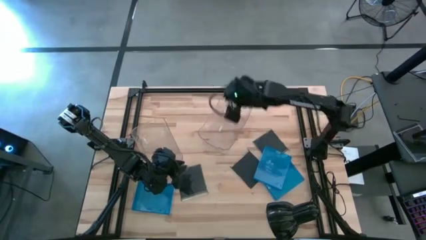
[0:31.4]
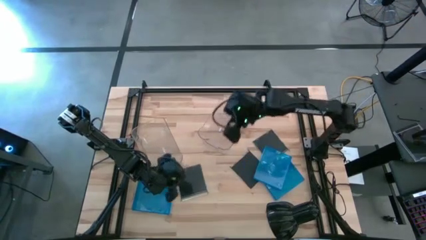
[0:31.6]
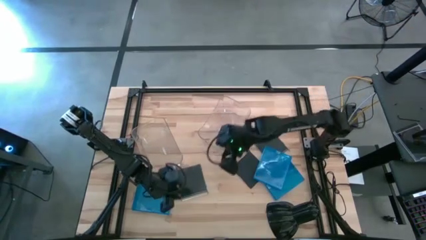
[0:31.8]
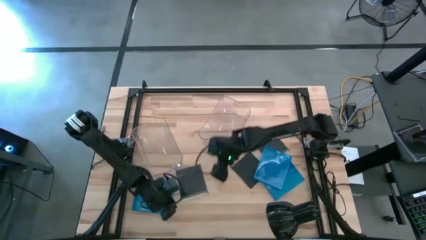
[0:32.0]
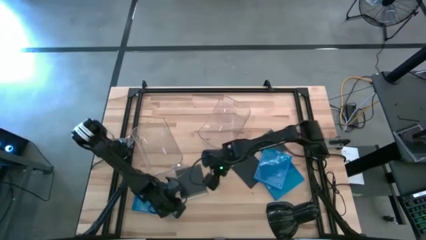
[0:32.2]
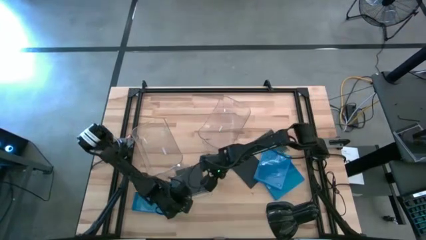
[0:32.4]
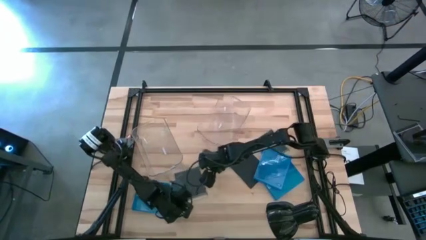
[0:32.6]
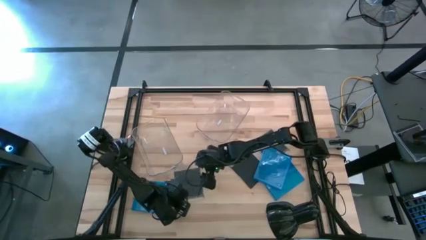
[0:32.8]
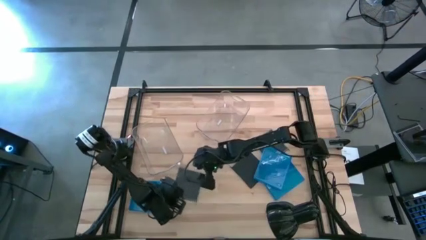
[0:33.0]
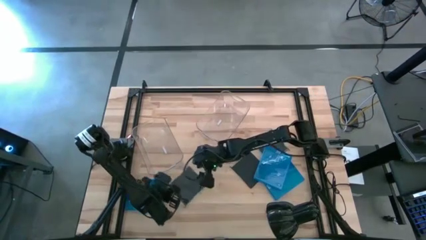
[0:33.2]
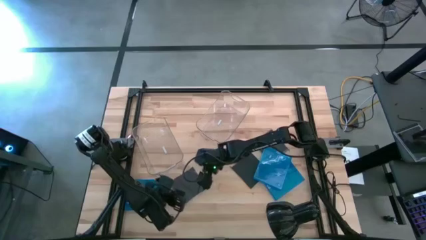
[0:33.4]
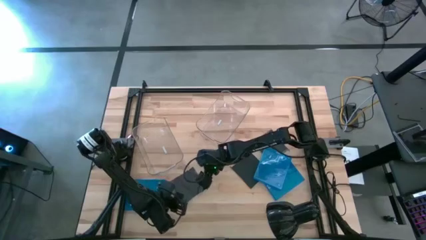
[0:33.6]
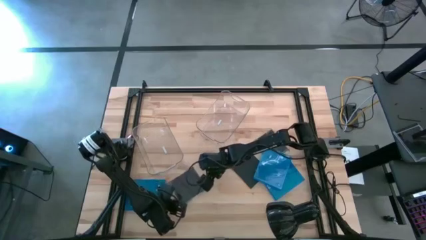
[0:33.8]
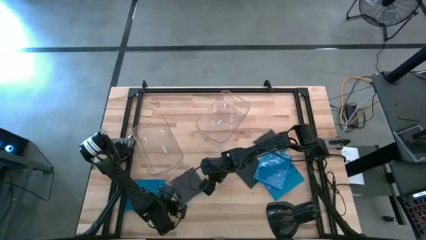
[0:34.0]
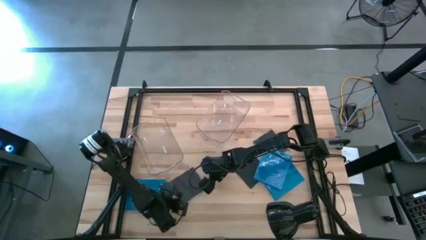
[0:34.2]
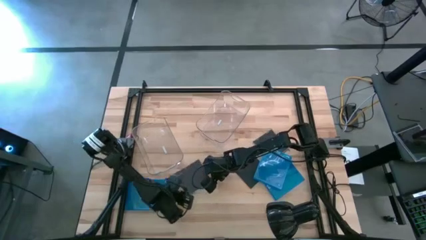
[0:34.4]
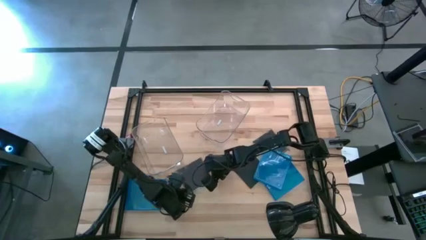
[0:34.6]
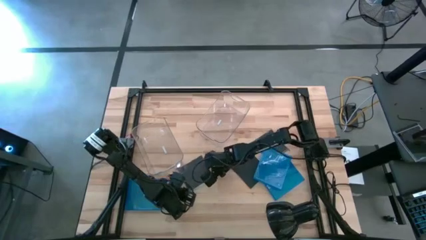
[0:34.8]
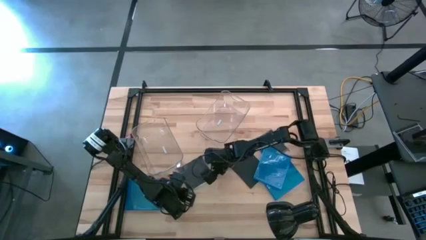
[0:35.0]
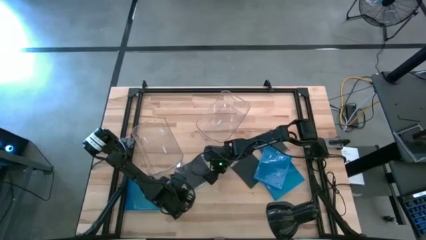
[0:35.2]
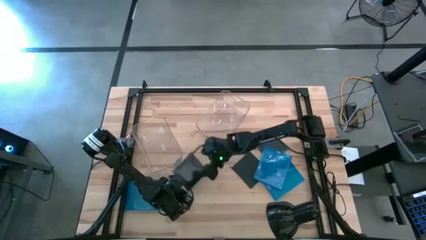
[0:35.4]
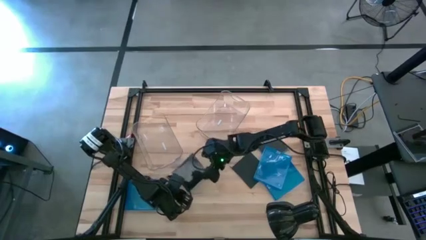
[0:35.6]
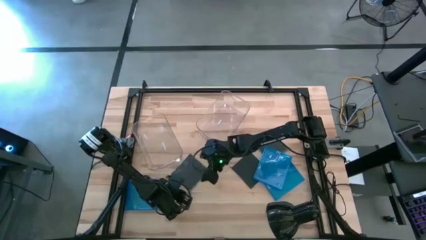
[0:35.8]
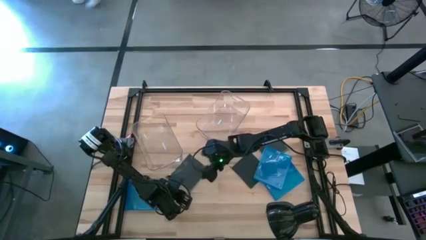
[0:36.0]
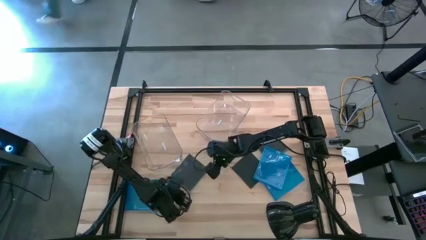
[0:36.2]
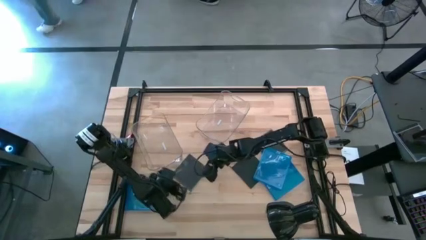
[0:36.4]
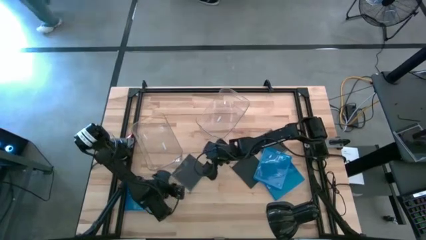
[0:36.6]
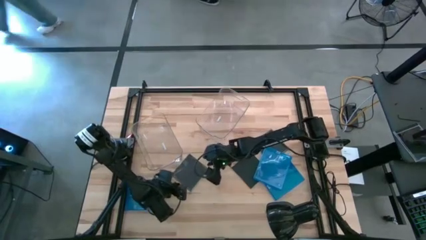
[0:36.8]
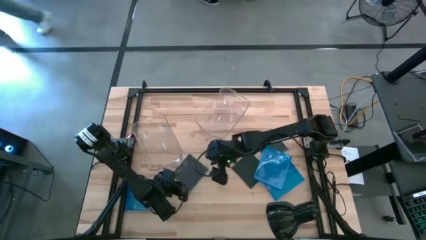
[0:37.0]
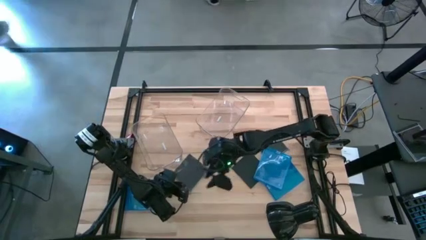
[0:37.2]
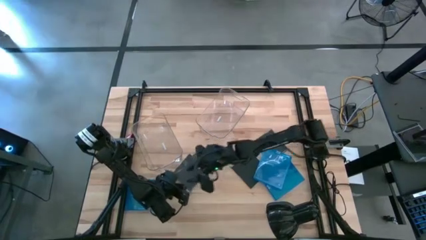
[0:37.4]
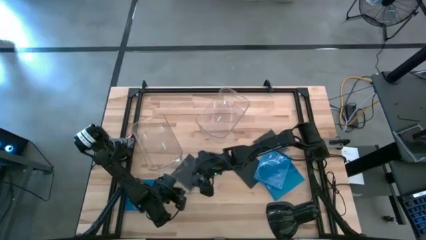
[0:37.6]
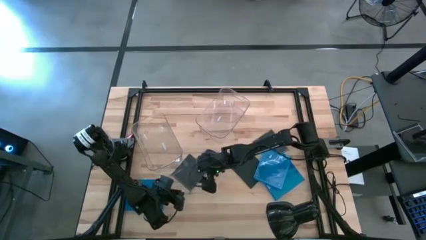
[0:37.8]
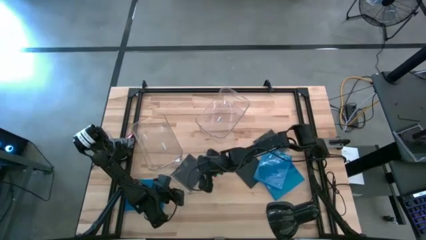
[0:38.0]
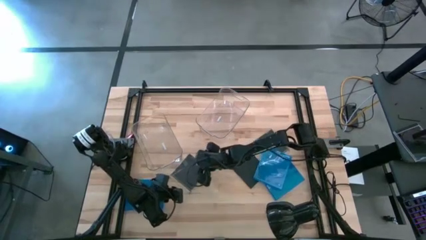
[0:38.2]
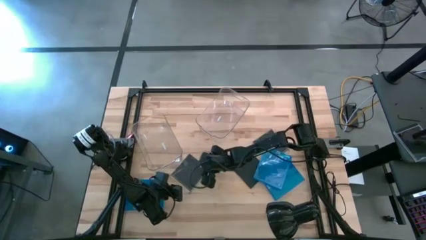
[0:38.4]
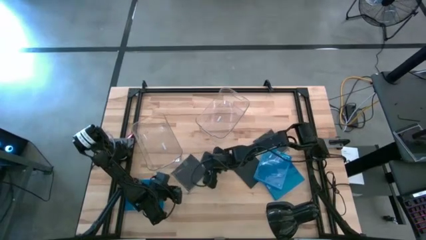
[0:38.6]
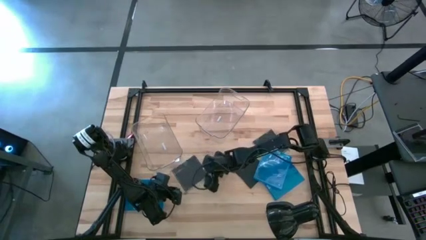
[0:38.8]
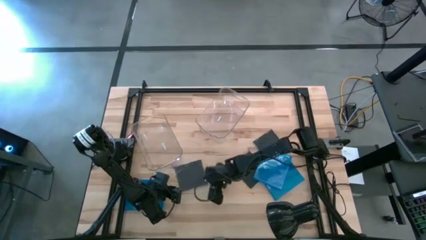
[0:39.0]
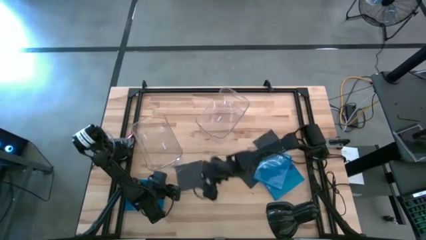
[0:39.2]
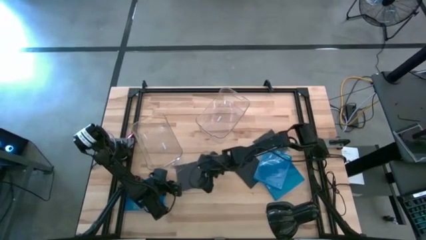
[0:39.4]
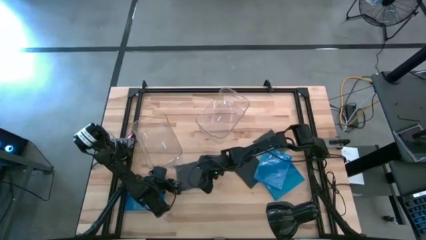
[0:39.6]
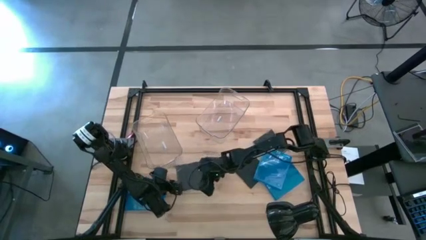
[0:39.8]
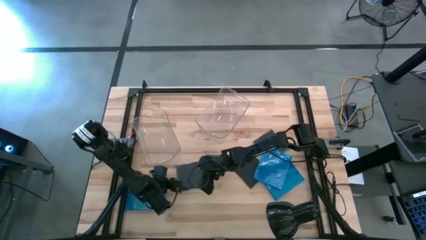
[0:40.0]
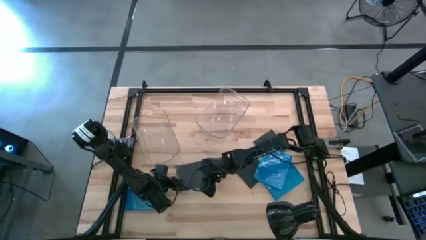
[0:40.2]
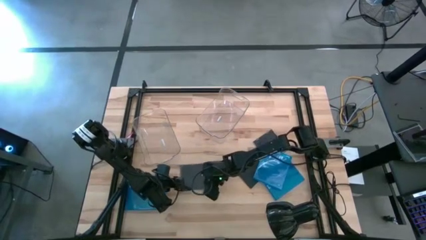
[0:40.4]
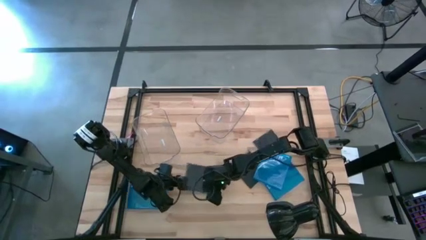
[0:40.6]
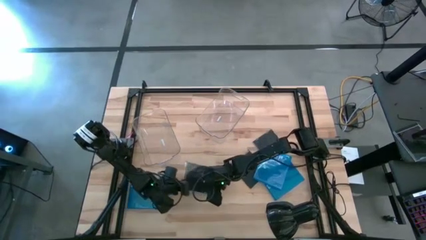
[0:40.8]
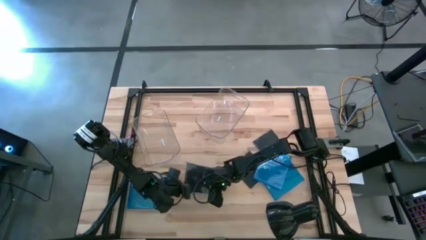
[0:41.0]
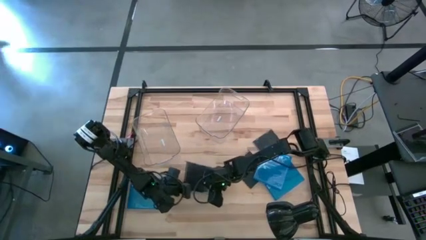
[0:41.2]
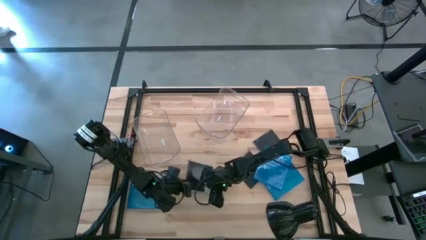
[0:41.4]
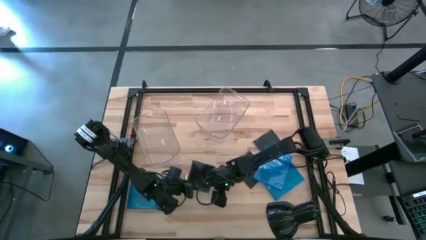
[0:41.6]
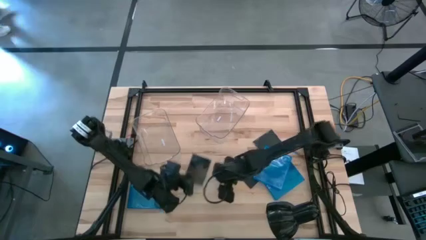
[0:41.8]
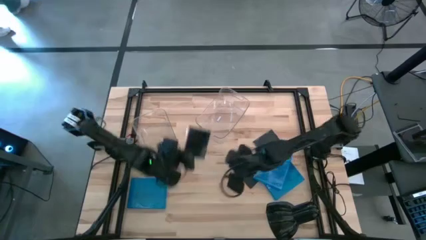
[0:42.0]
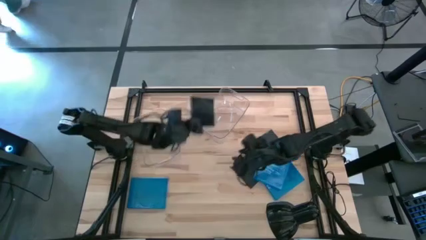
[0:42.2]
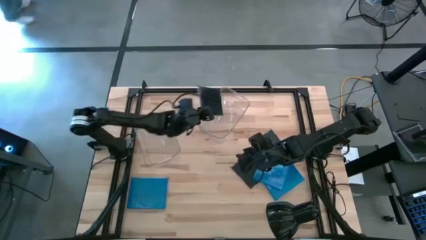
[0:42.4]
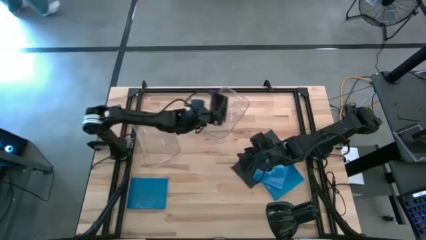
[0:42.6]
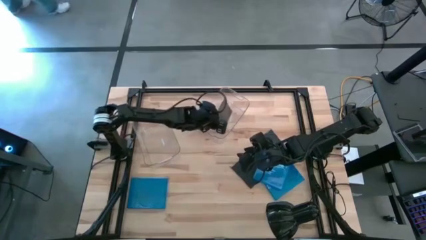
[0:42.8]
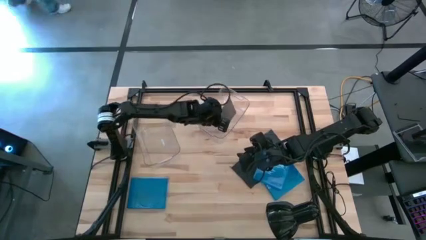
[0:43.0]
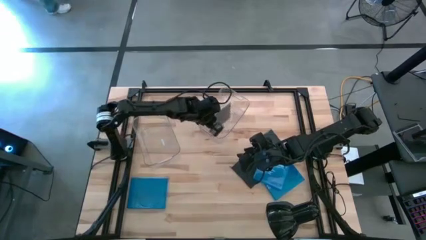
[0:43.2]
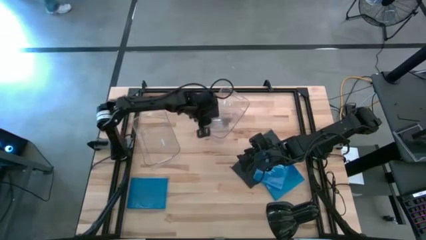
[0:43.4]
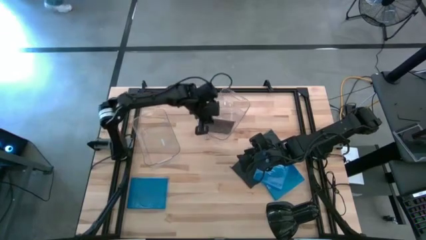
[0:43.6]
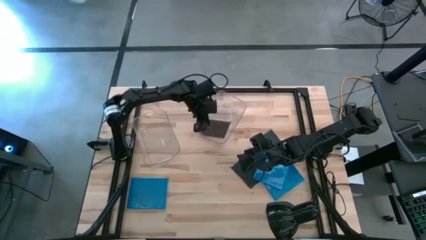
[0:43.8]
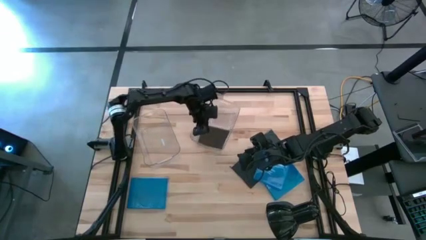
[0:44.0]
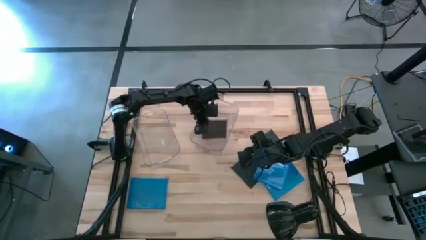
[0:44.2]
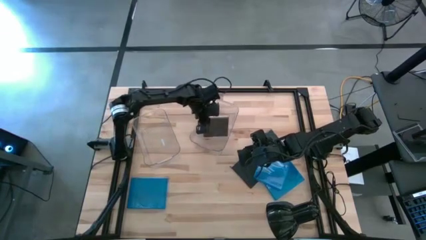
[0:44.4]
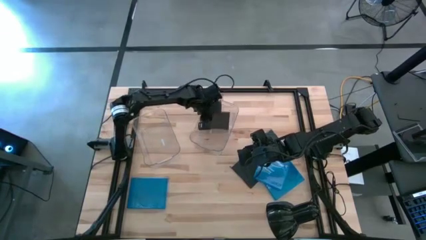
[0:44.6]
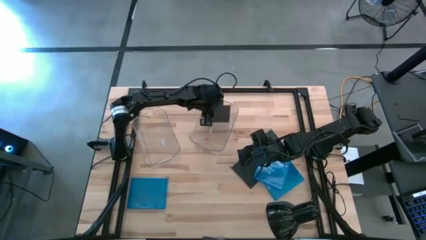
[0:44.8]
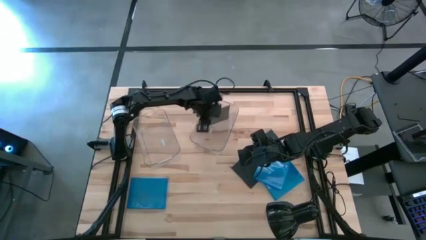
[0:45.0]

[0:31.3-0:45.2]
Task: Pick & place jewel cases by type
Put the left black CD case into the right transparent bin

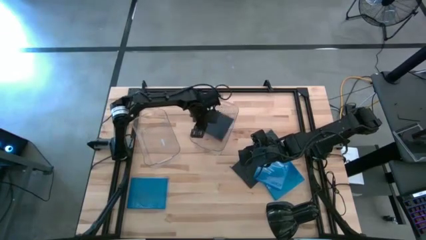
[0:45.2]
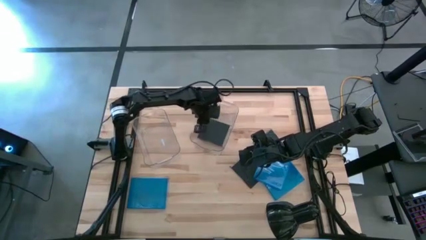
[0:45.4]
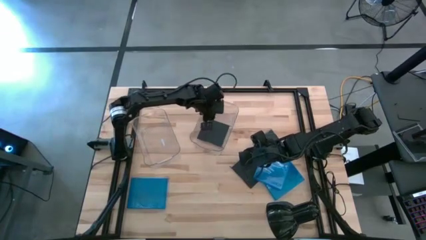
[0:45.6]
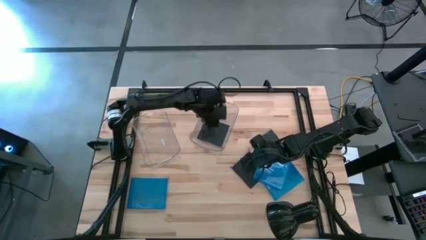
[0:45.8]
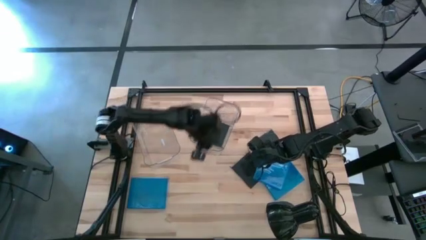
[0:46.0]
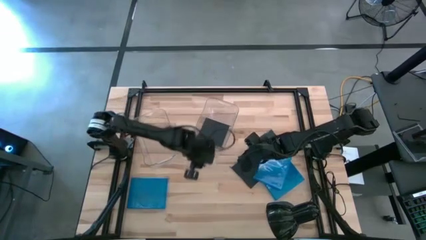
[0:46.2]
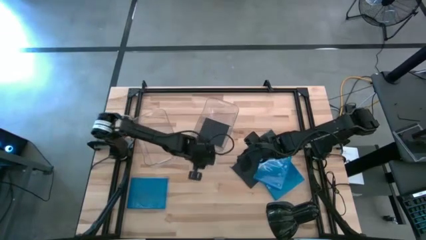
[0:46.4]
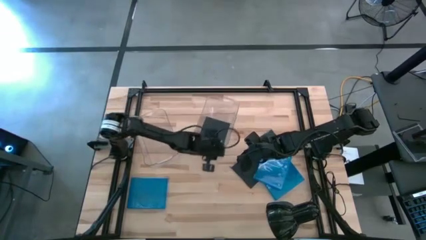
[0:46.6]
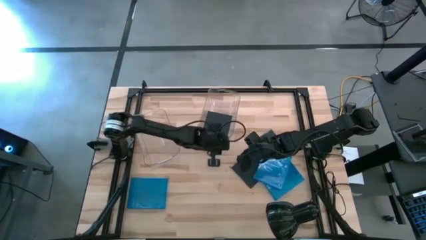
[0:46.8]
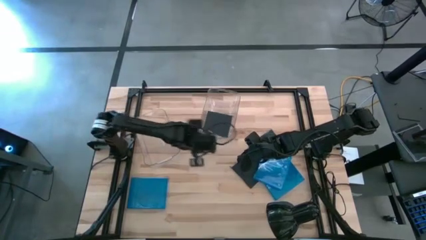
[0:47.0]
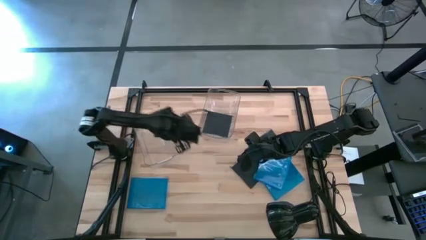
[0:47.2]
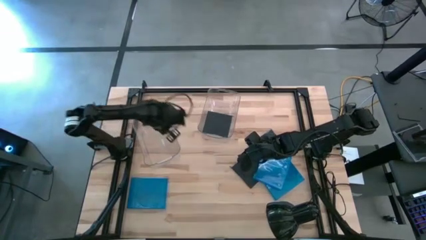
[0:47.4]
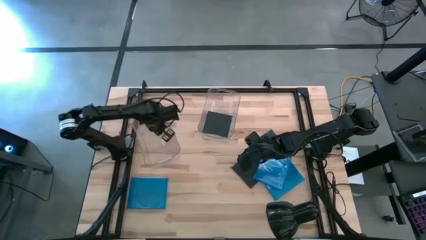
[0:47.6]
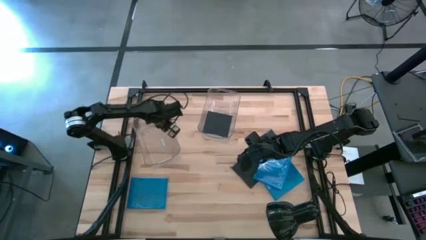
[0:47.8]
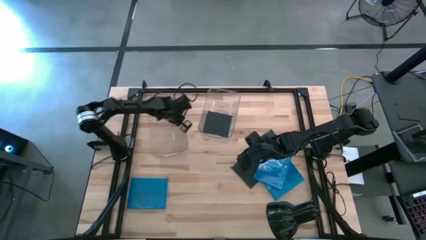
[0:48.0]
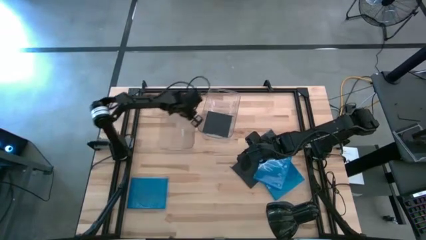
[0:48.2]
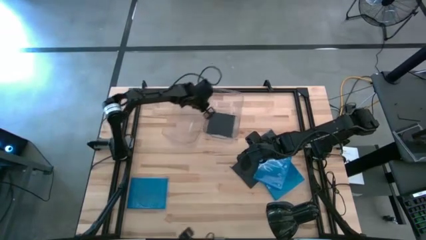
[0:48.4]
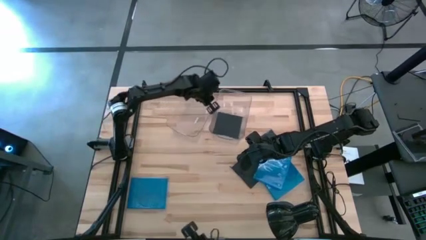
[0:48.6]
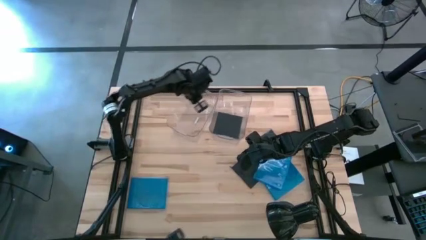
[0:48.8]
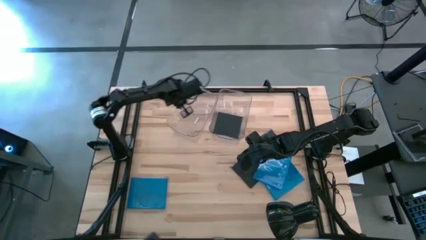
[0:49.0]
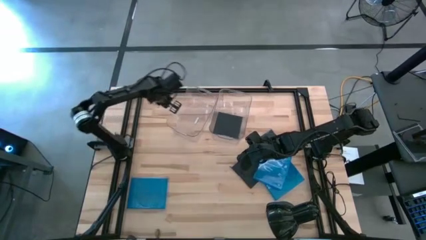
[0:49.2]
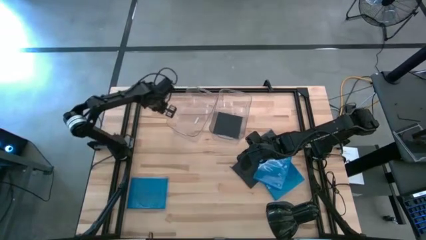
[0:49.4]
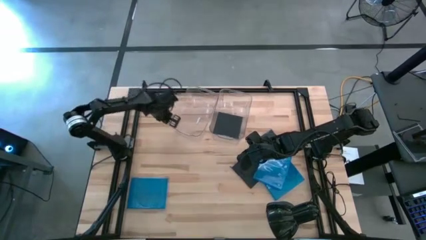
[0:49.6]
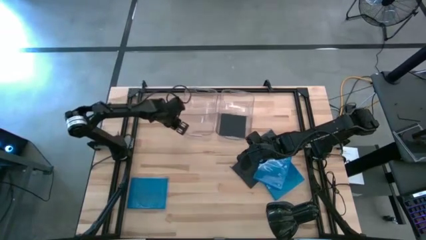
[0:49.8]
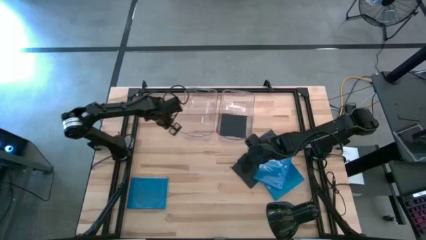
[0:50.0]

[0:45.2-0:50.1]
Adjust the transparent bins
